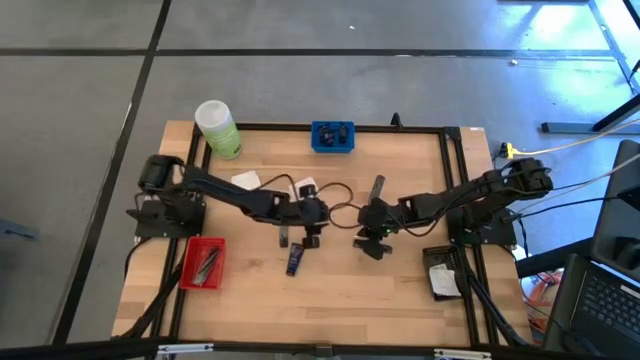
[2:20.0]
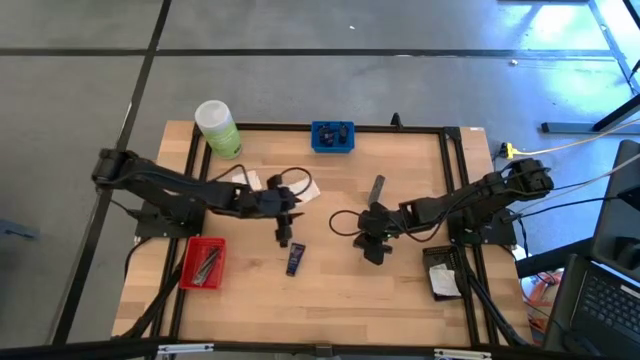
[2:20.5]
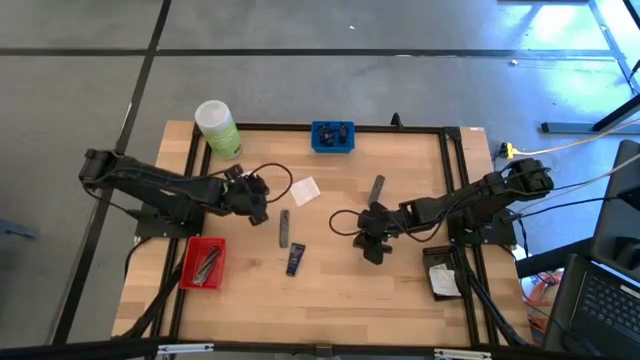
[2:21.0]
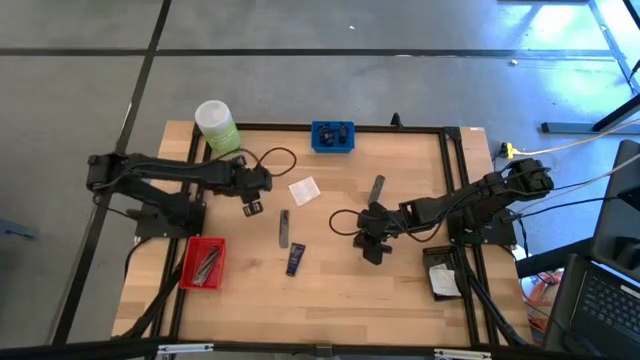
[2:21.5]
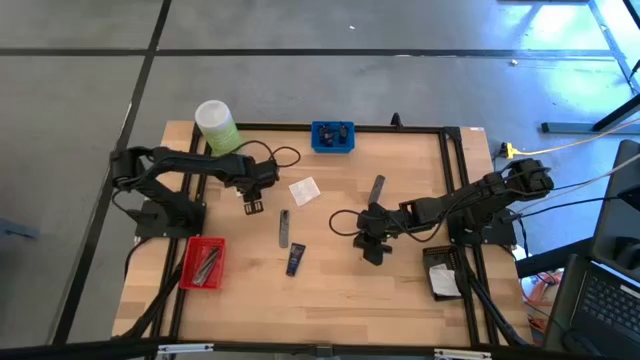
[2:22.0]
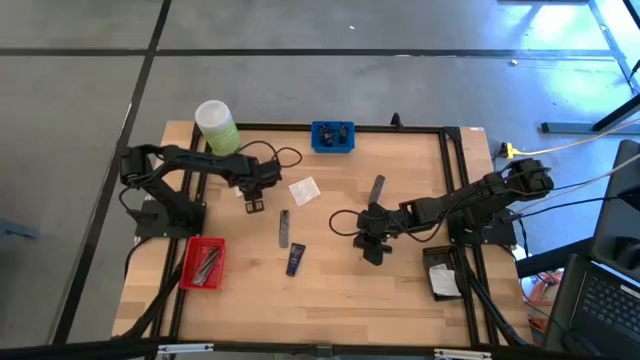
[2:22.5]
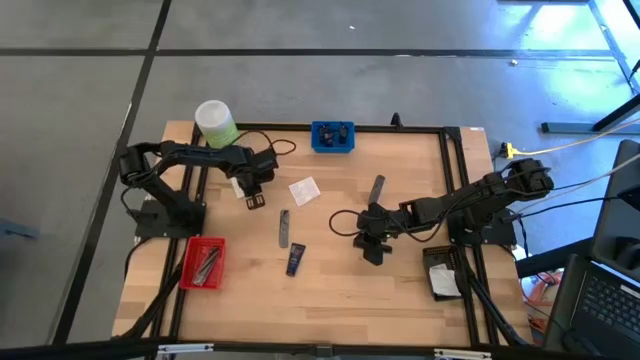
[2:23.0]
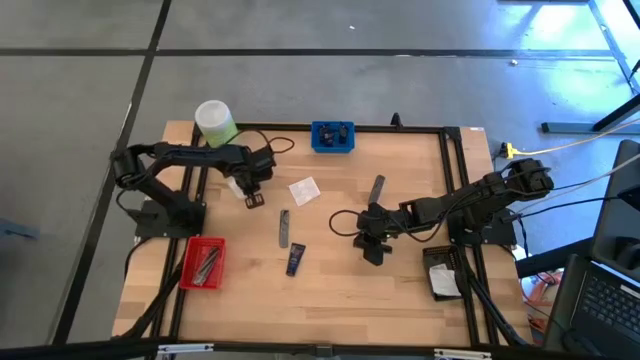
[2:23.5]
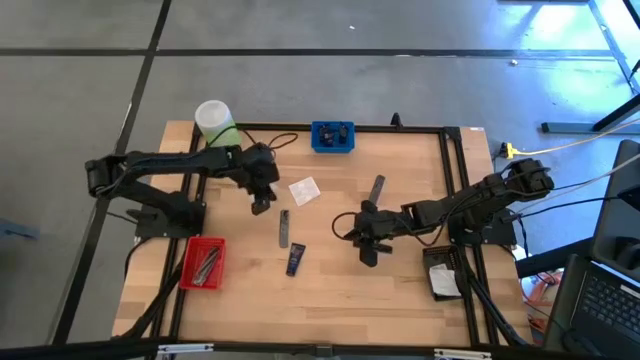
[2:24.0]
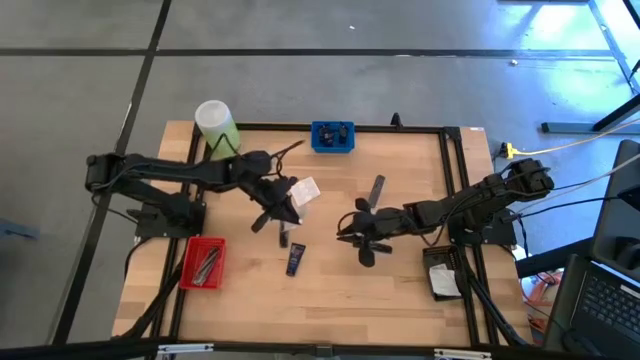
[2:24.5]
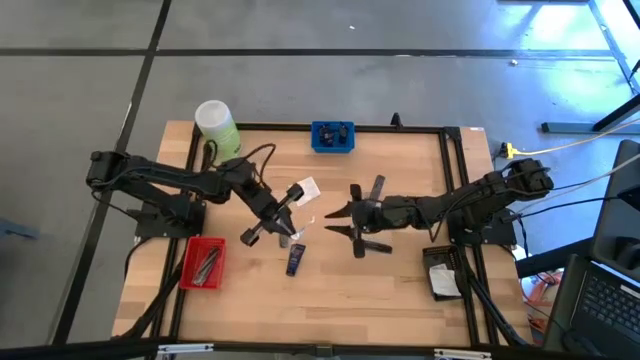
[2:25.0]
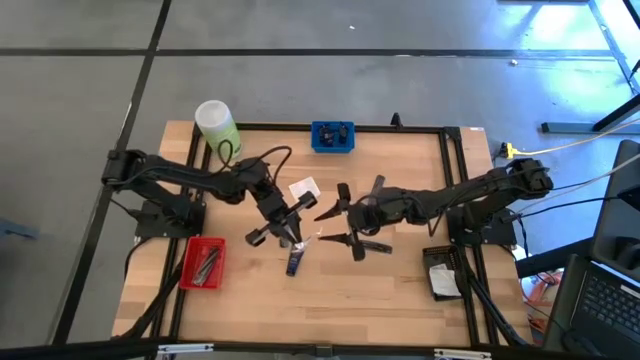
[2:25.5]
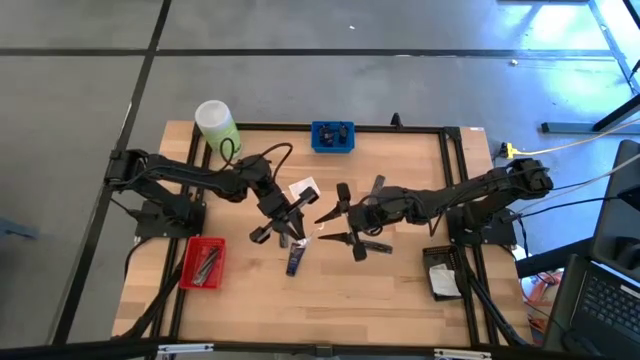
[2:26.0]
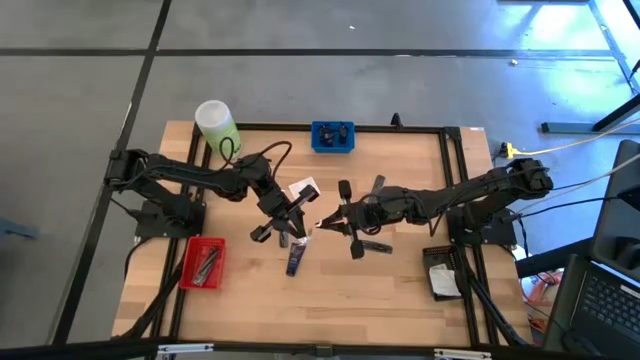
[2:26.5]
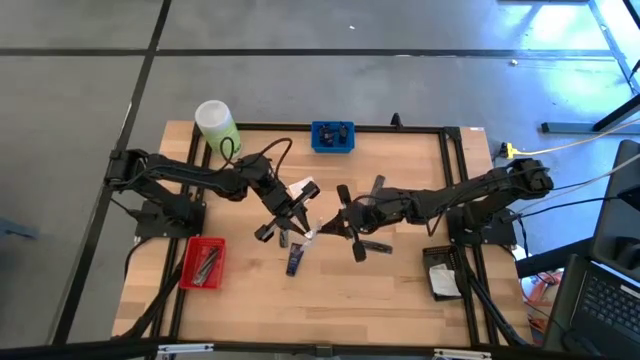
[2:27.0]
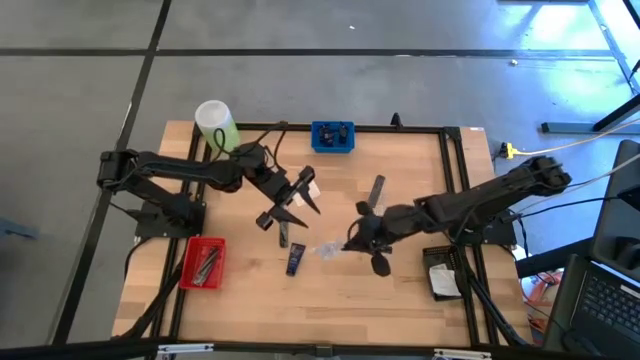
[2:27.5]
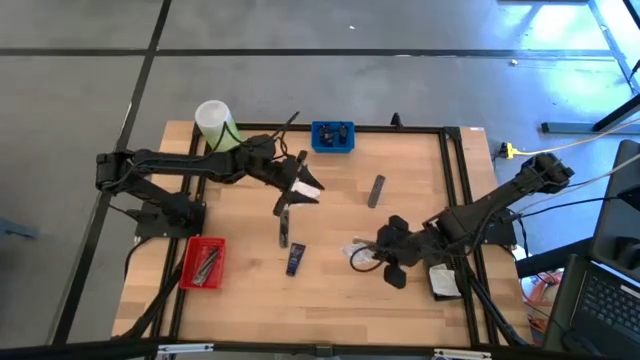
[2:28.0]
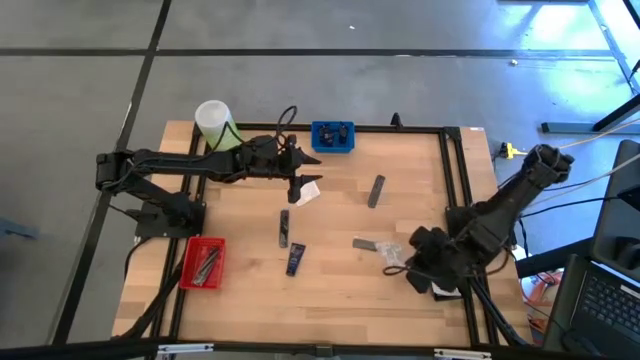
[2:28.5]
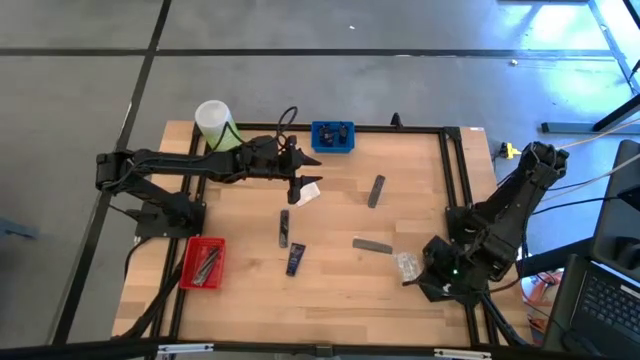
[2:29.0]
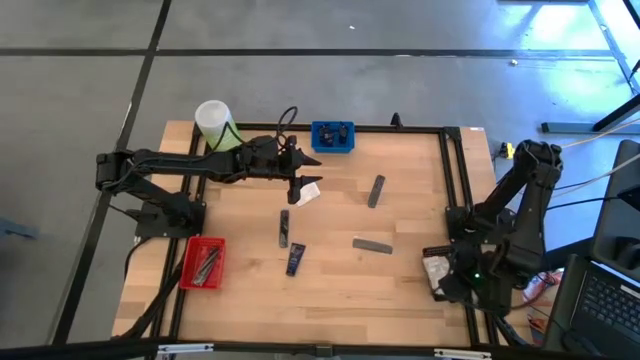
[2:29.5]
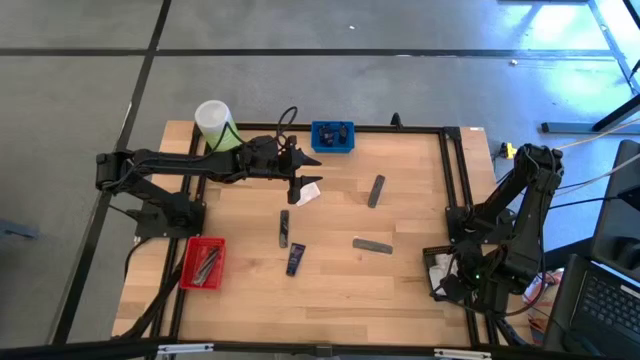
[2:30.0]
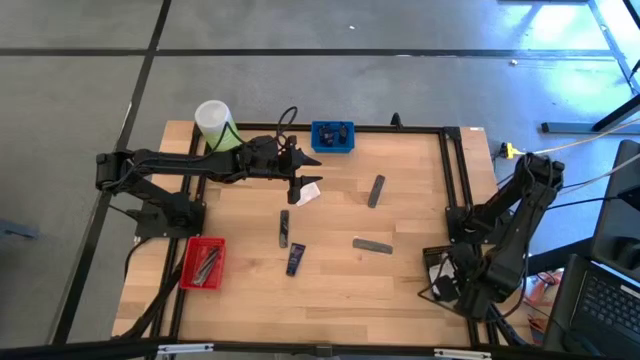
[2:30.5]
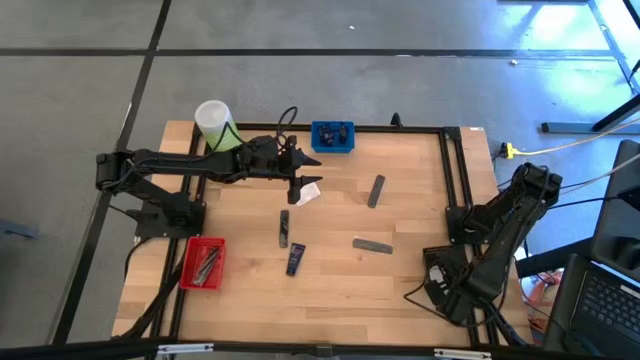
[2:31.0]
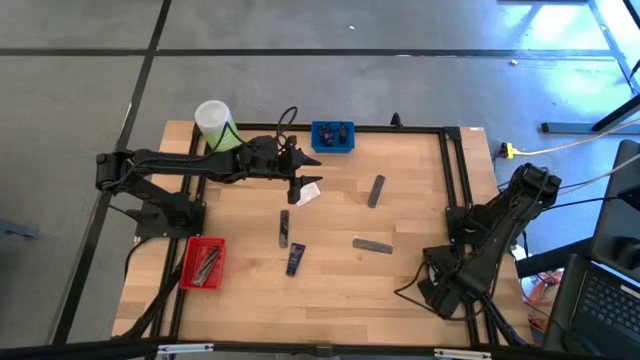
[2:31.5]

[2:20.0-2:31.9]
Task: Pick & Place Travel size toiletries
Put the white bandage pad into the black basket

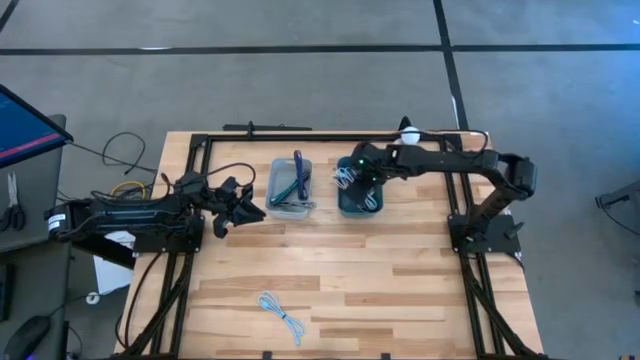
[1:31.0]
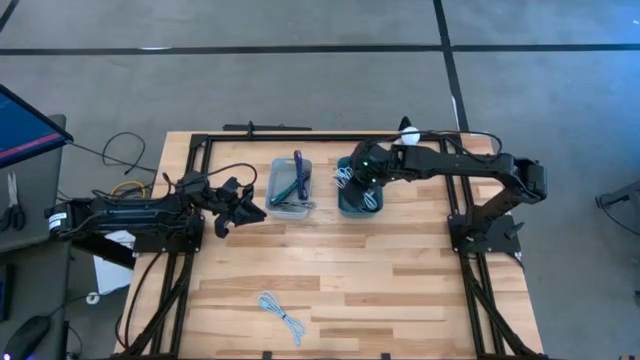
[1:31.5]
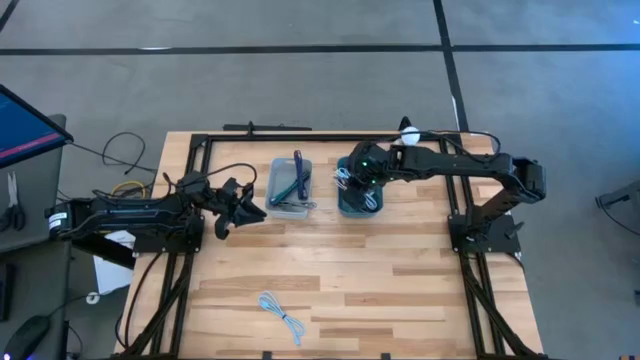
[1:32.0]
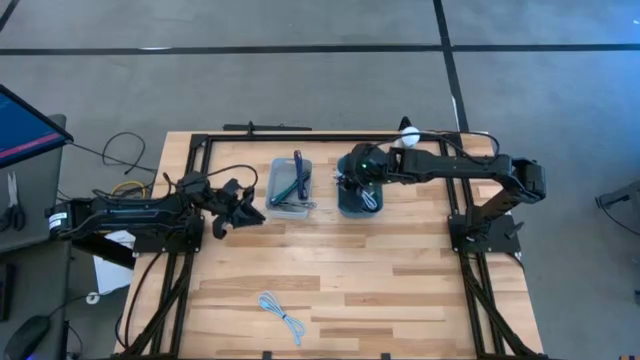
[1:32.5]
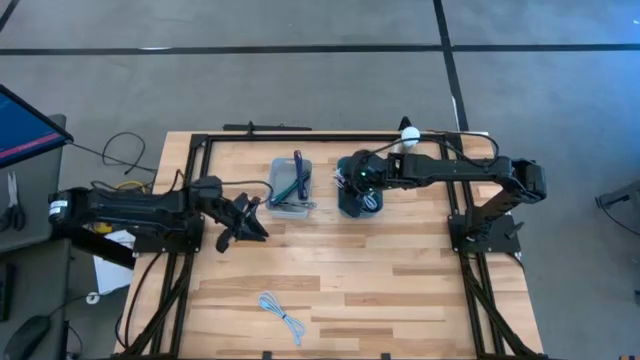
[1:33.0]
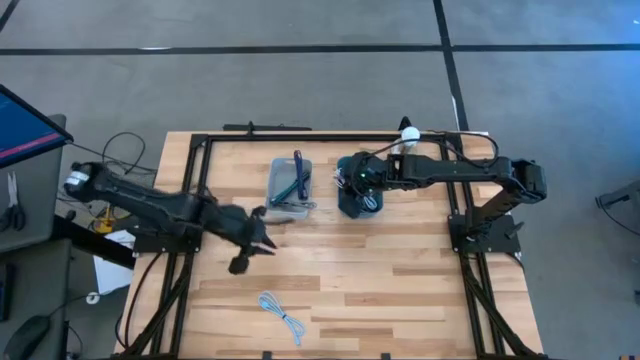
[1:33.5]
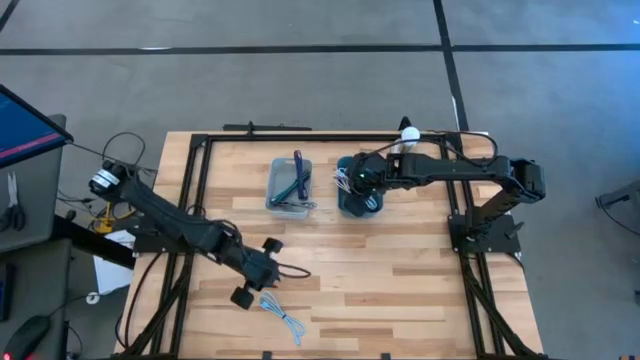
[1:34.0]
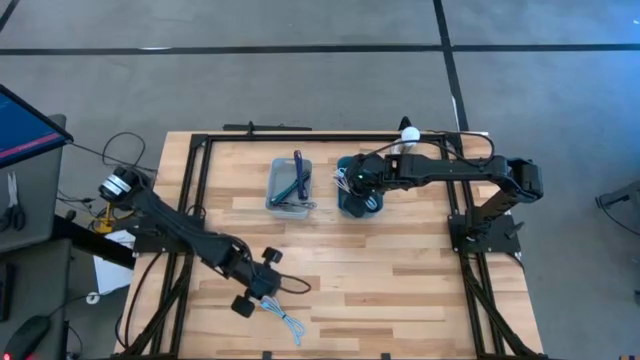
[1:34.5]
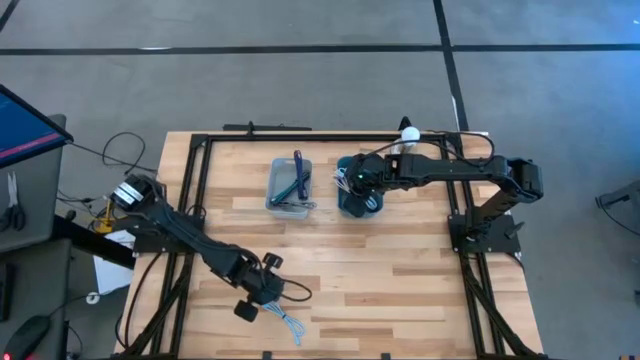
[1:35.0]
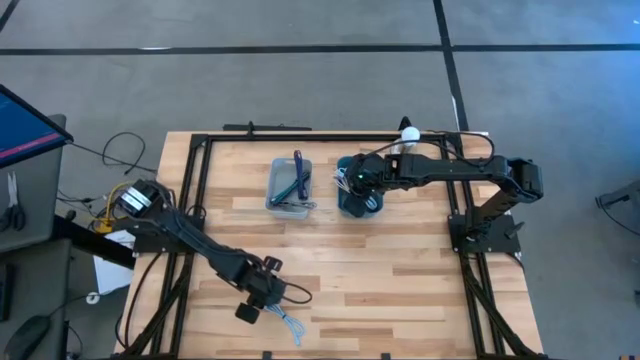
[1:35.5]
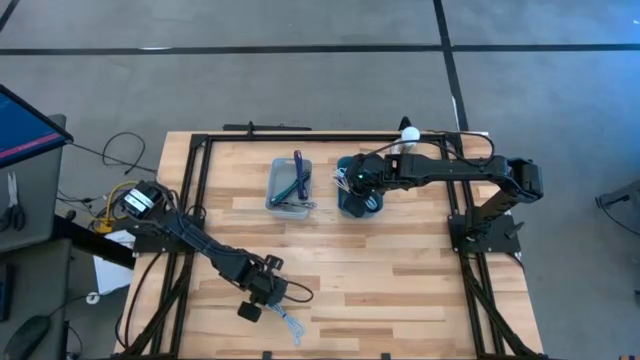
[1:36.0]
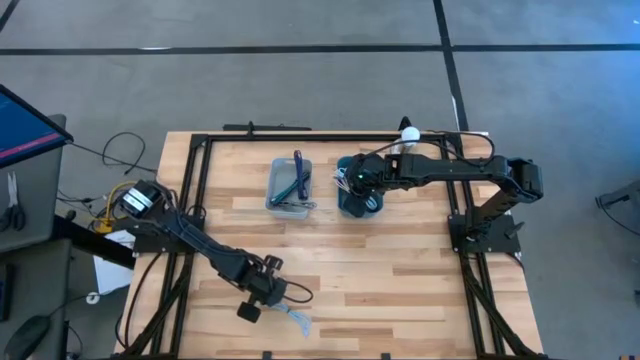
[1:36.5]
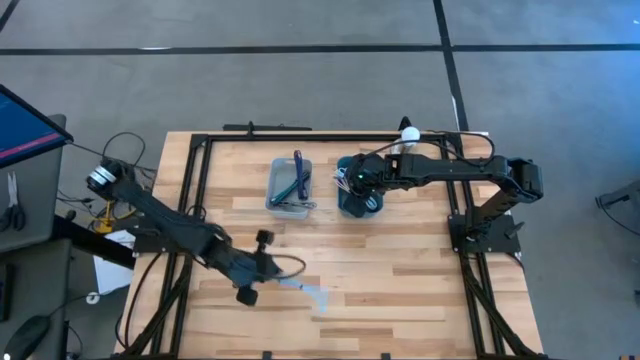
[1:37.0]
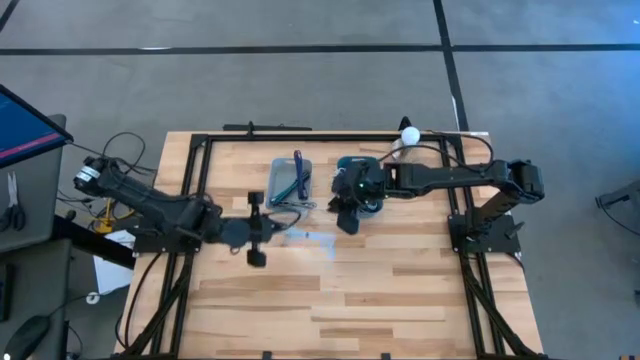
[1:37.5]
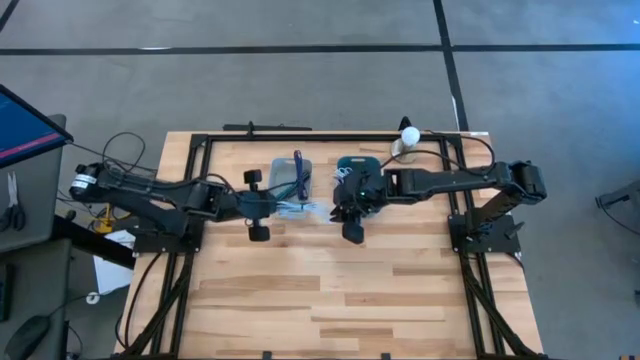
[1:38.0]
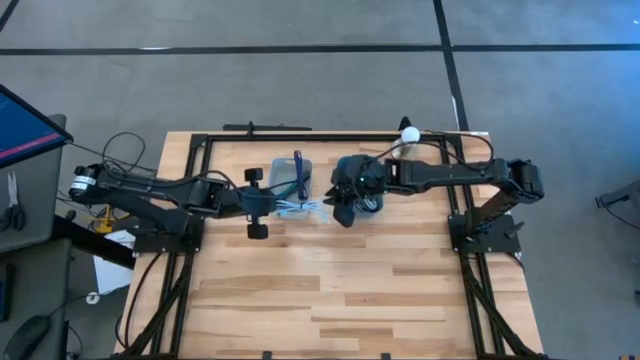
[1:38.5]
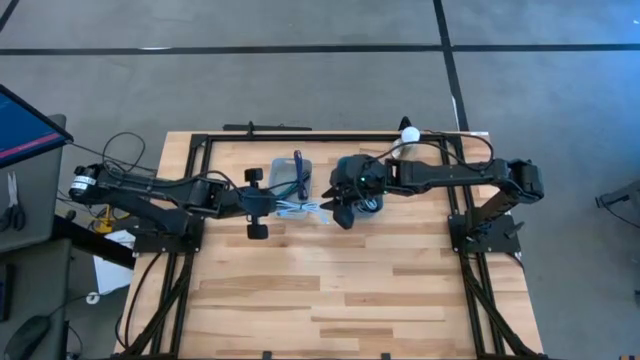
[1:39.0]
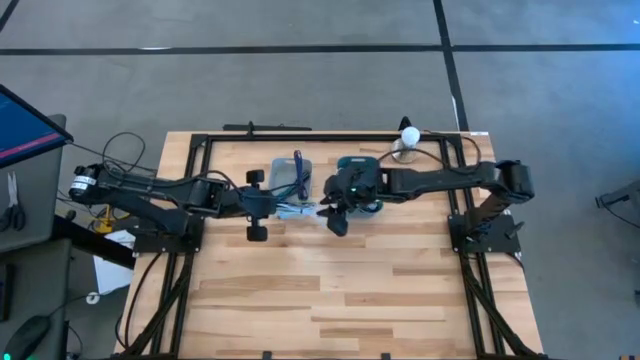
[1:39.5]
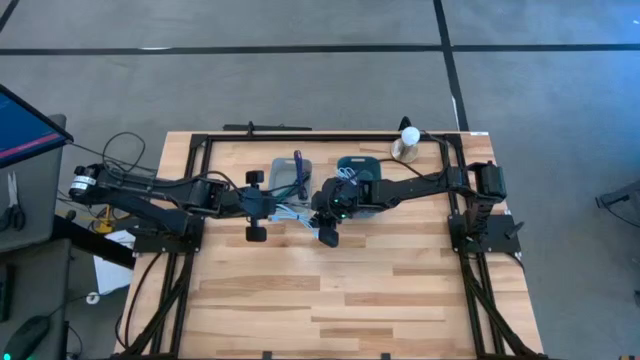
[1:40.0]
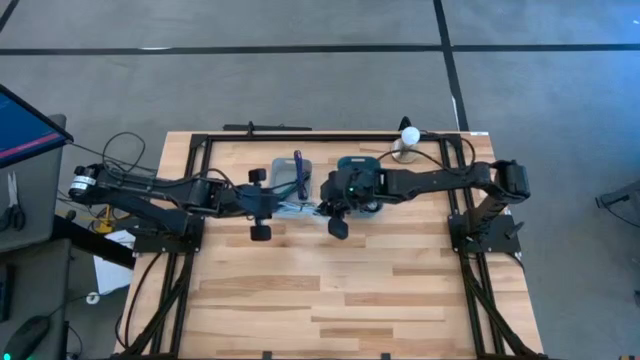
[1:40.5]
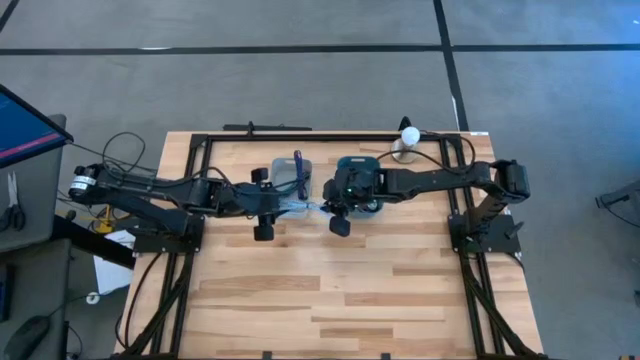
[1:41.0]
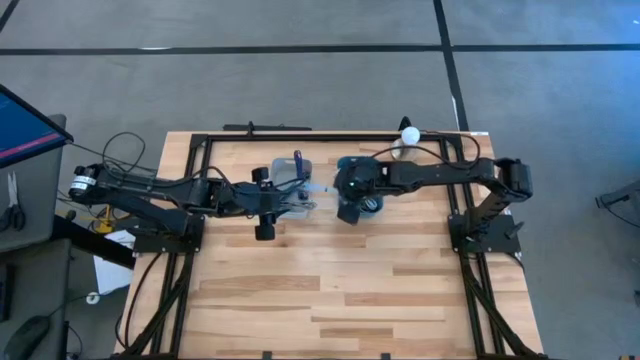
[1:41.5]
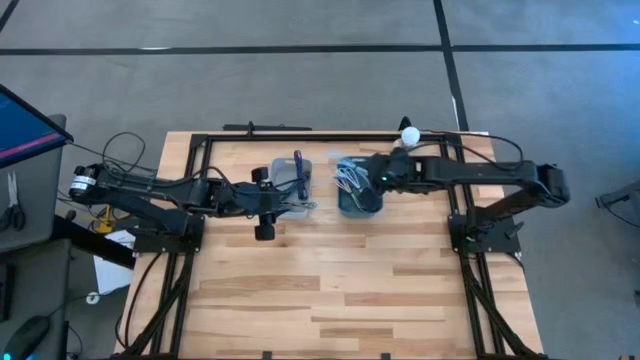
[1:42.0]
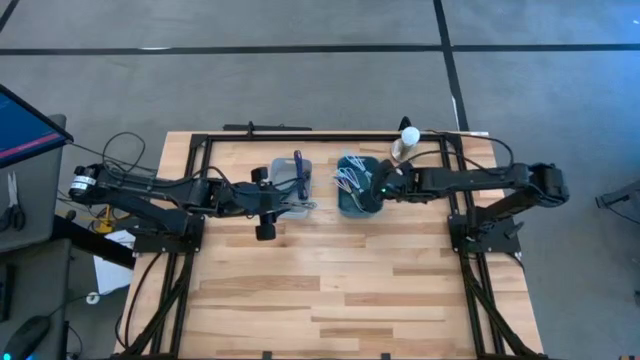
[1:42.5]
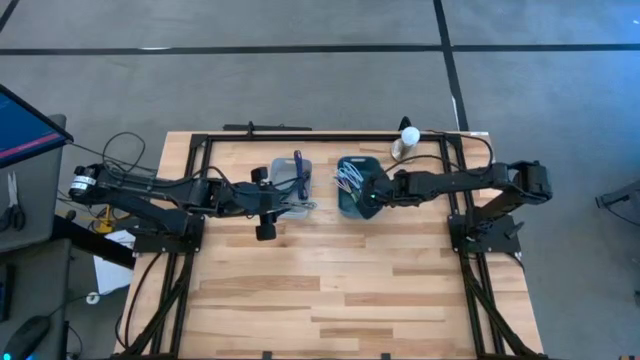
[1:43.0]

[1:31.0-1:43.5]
Task: Pick & Place USB Port
Put the light blue charger cable into the blue bin
